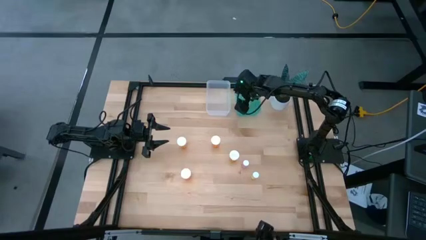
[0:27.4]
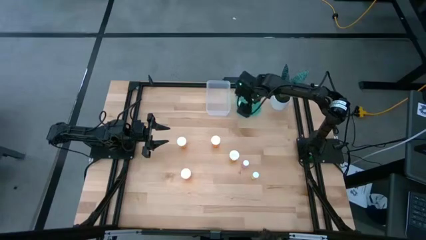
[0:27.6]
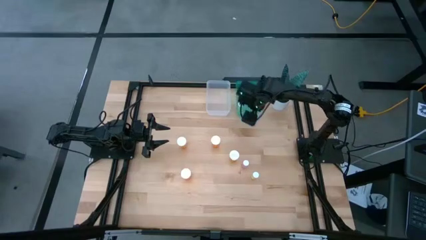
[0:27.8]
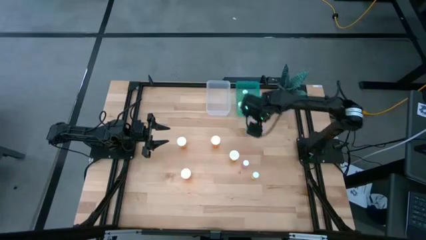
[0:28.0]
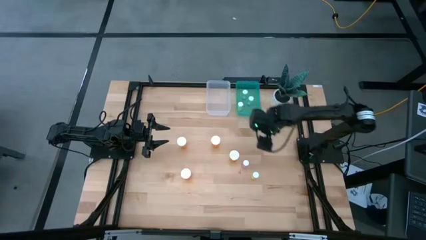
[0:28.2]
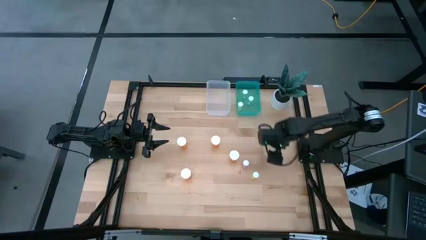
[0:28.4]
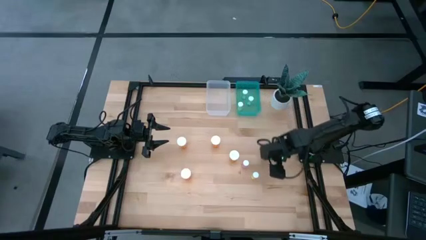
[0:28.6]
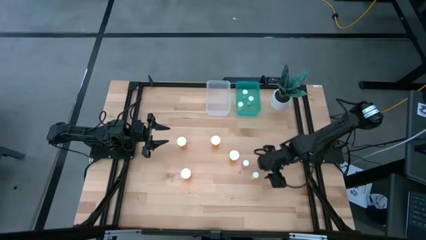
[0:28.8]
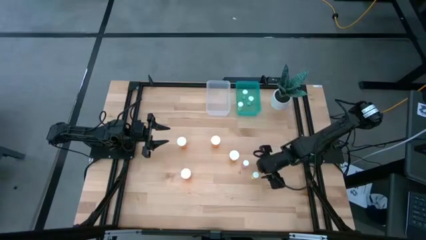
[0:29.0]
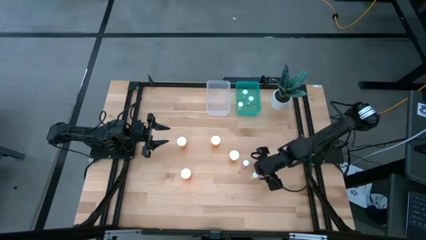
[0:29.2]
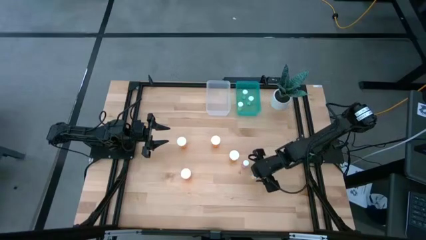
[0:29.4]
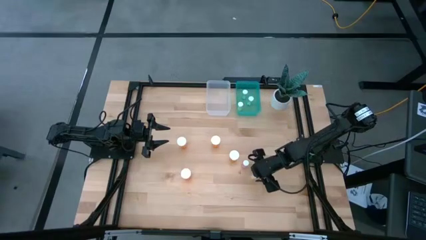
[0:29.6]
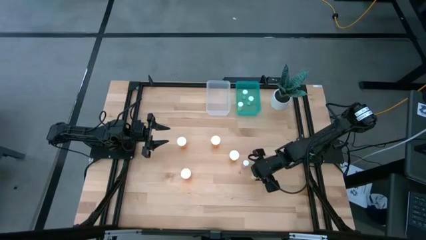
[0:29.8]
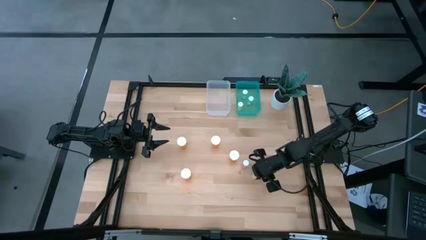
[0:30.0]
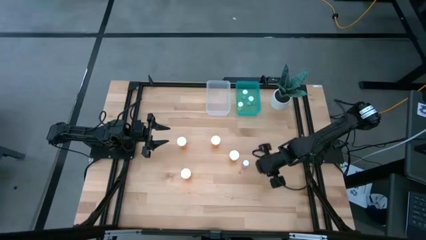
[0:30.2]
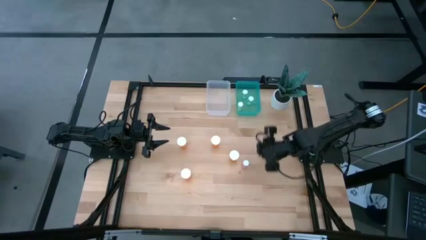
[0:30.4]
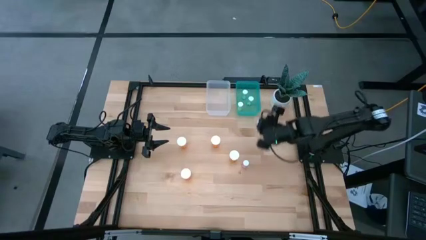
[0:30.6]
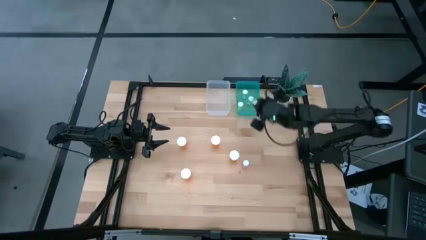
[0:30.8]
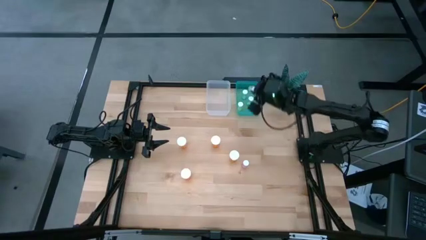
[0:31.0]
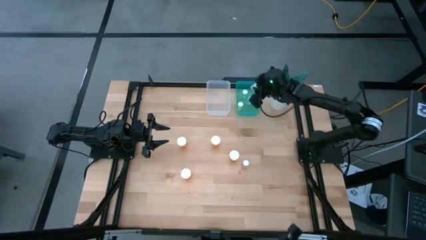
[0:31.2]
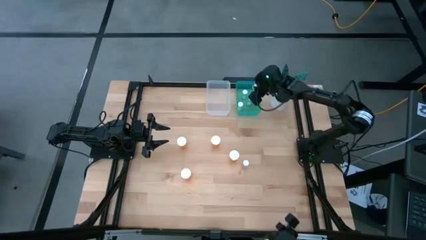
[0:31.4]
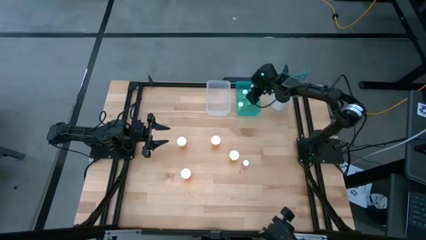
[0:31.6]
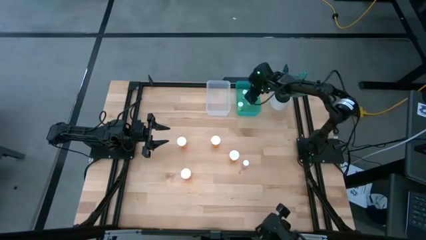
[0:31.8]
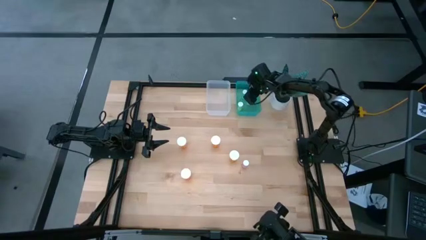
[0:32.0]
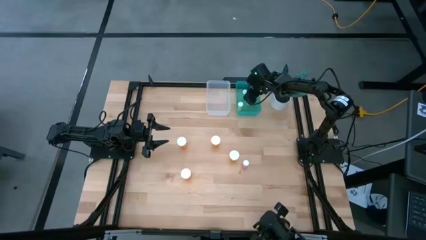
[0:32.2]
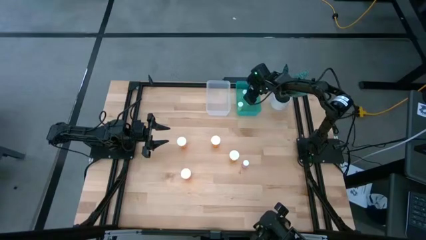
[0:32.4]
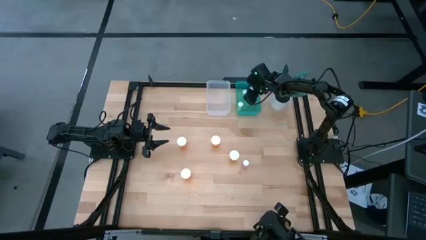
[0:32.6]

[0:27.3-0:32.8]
Task: Pick and place medicine bottles into bin by pill shape (circle, oval)
Put the small yellow pill bottle into the blue bin

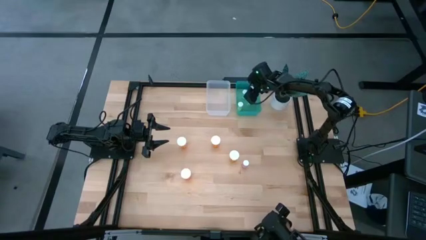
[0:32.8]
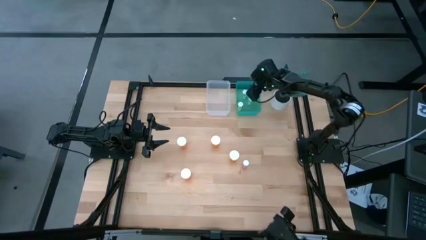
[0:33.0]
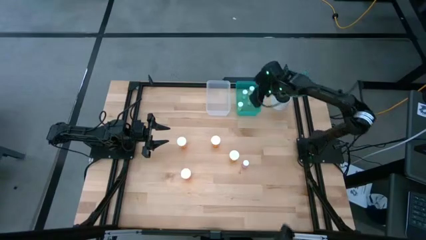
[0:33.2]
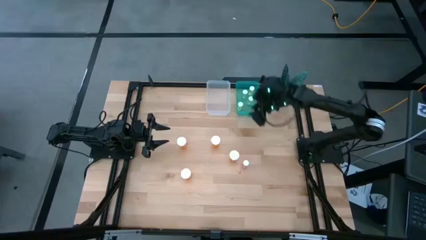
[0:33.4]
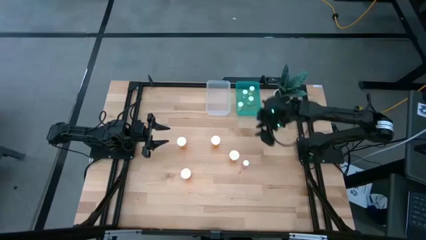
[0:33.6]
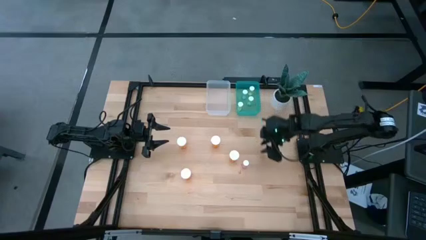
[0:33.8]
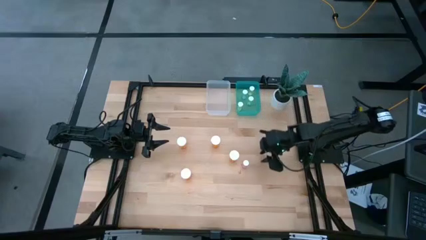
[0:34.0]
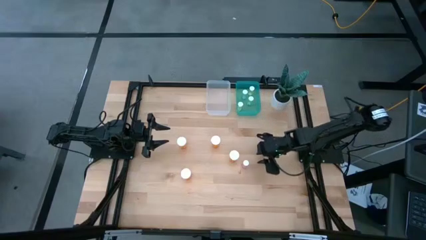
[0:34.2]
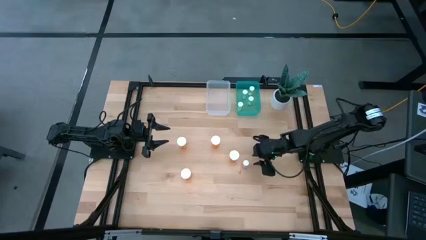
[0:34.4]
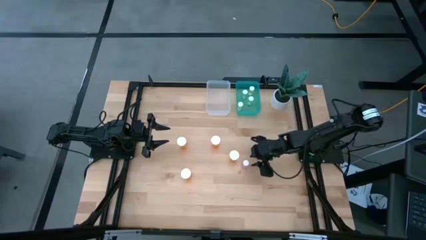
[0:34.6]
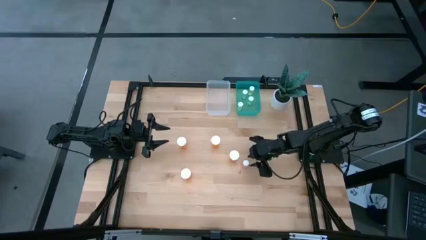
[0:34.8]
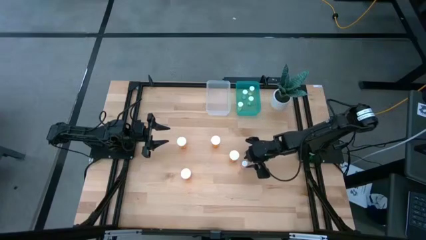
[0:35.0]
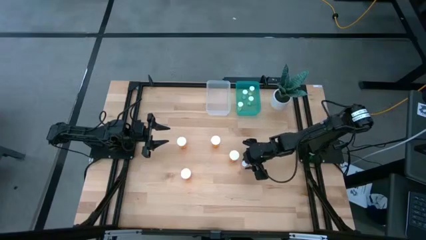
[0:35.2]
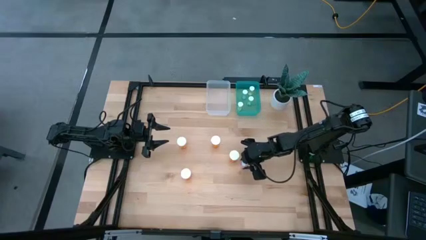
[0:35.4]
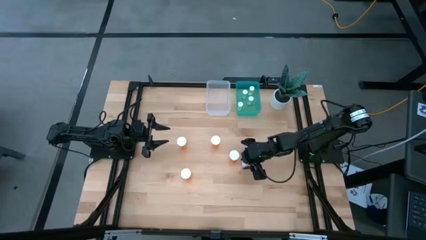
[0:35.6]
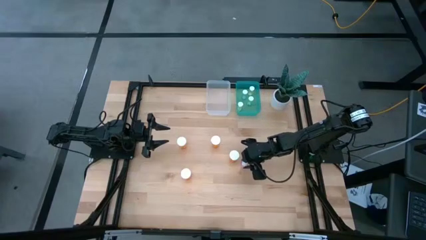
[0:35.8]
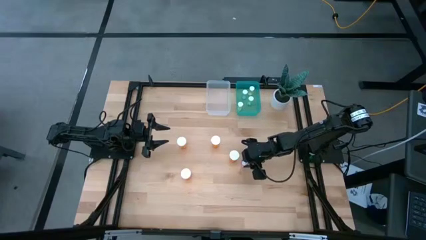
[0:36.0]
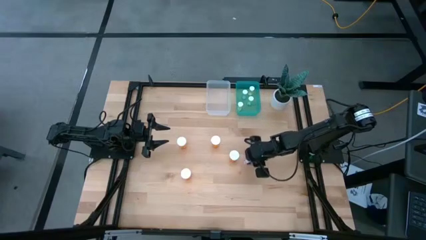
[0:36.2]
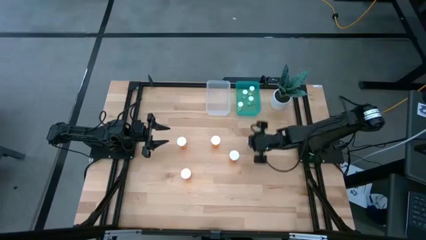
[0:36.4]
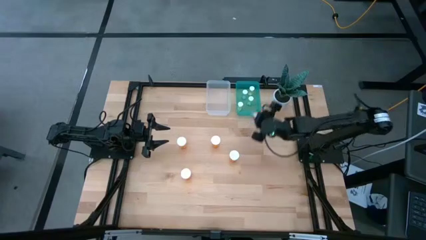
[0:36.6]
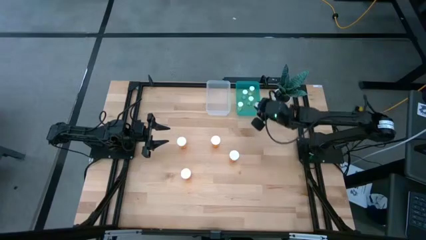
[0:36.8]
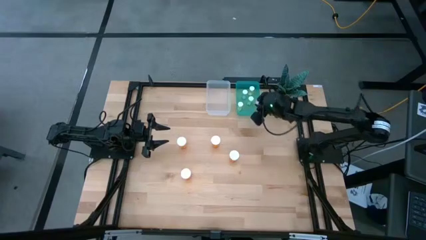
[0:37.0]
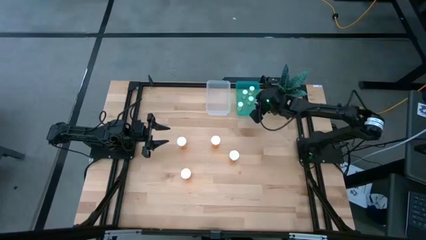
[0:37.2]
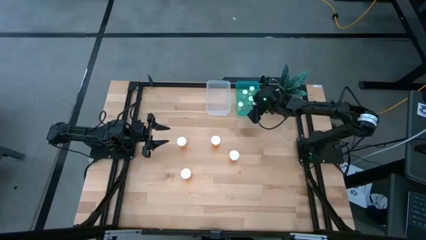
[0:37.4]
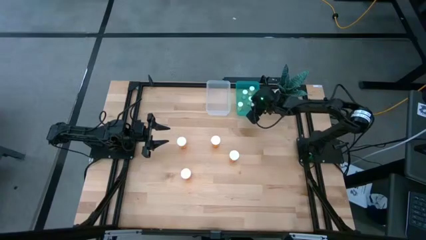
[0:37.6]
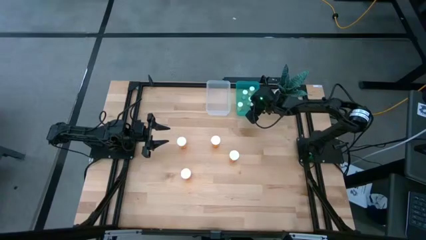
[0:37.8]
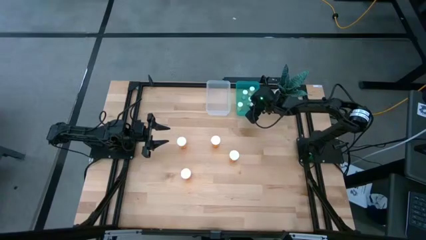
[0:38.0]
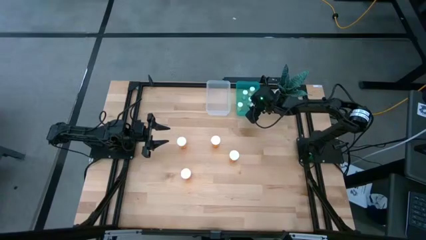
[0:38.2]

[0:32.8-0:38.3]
Put the small pink pill bottle into the blue bin

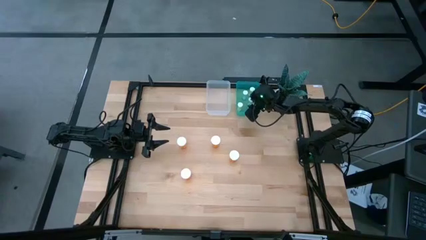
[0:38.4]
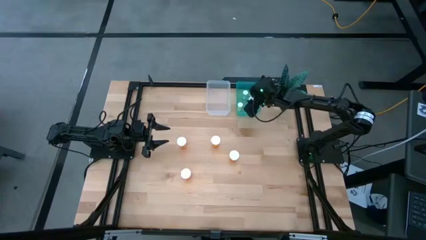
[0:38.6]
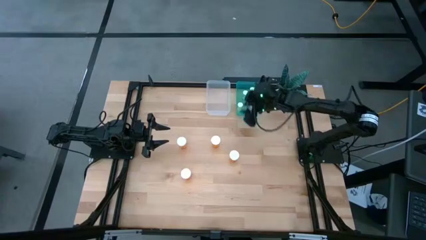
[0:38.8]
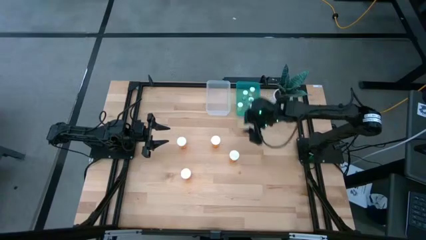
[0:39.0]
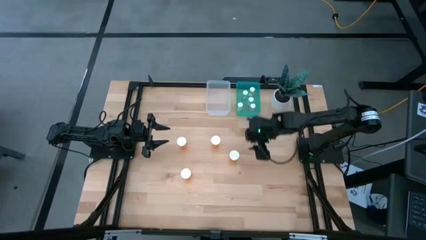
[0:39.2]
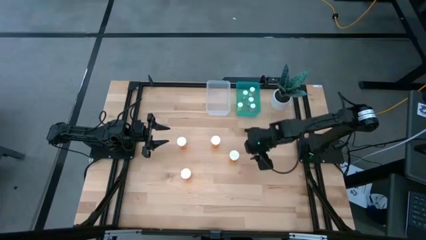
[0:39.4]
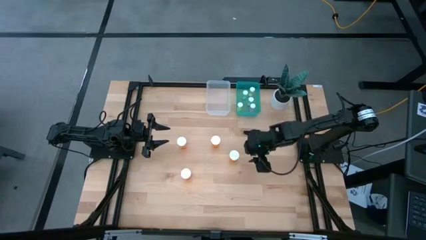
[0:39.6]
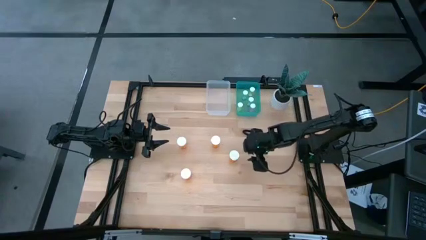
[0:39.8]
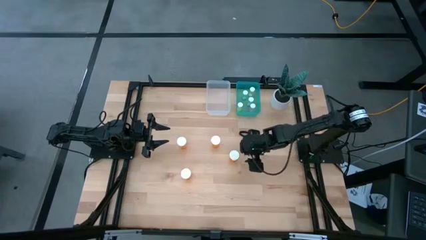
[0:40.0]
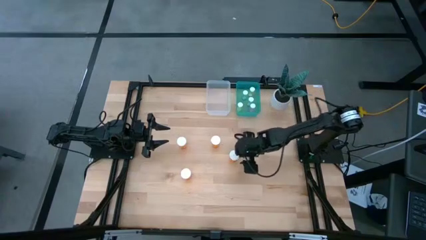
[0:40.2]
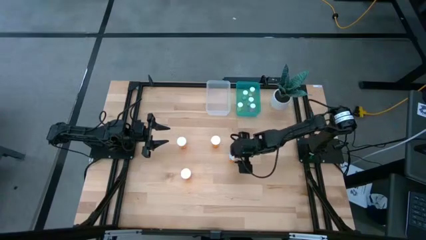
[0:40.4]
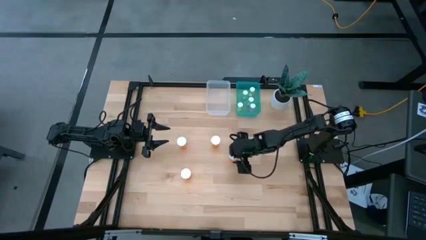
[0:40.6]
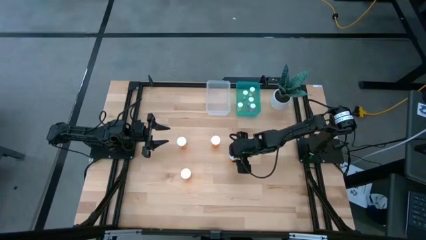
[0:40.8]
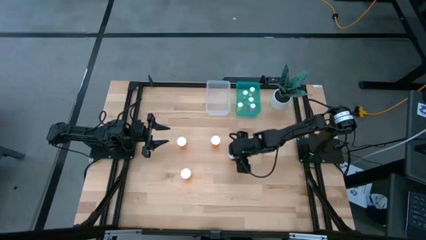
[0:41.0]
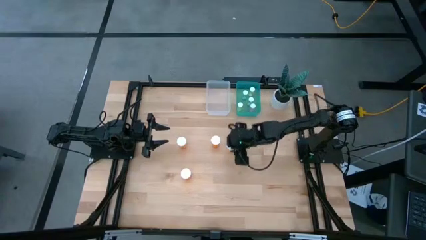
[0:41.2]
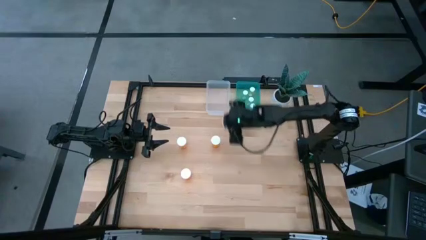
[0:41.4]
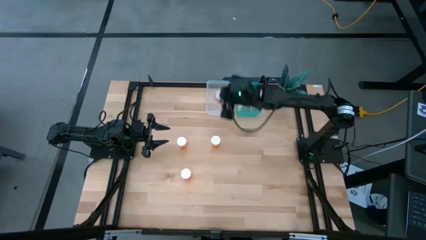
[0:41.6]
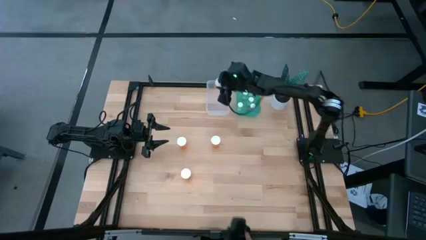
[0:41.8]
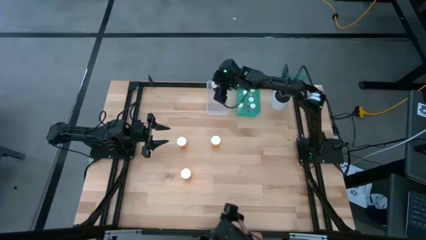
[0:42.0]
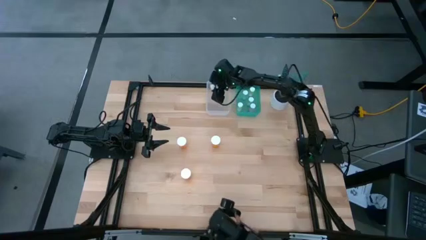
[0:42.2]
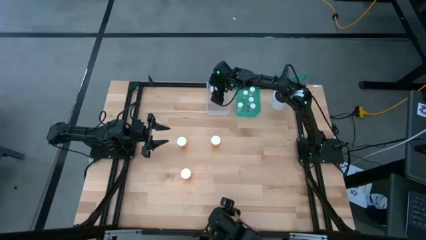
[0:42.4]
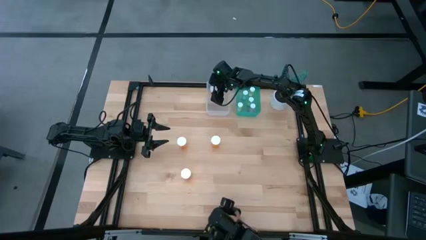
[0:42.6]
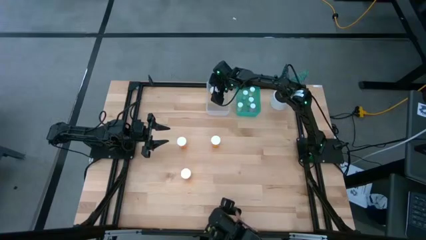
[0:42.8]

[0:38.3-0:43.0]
Put the large orange pill bottle into the transparent bin

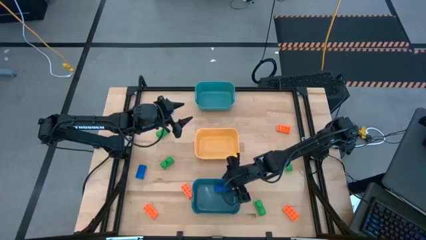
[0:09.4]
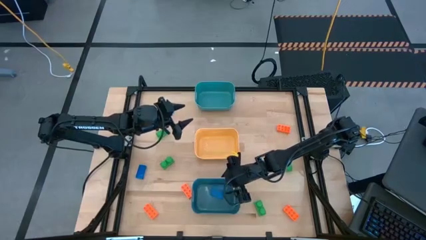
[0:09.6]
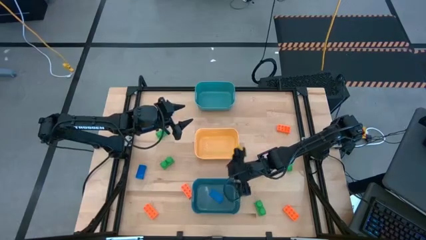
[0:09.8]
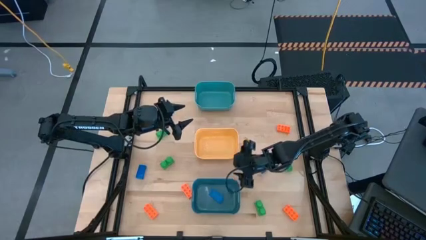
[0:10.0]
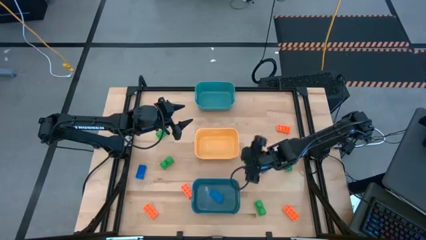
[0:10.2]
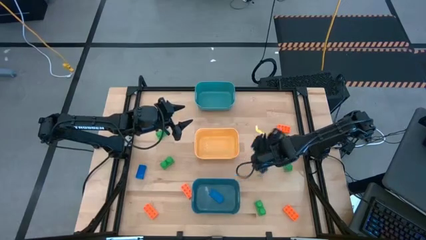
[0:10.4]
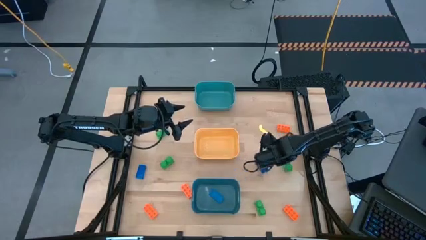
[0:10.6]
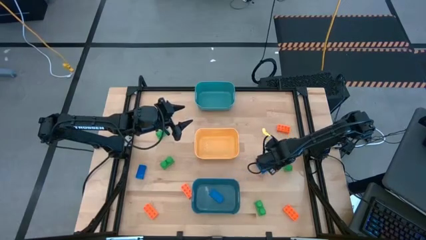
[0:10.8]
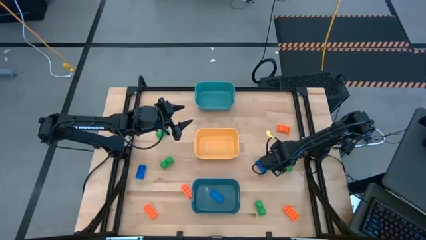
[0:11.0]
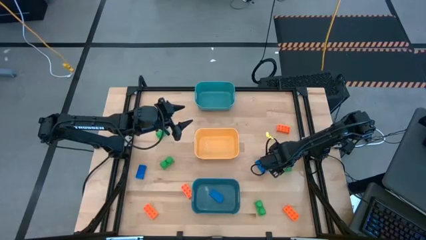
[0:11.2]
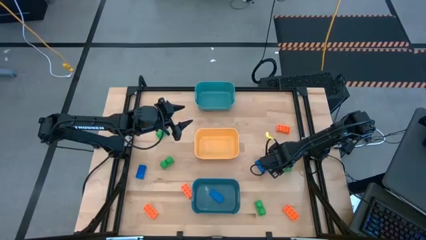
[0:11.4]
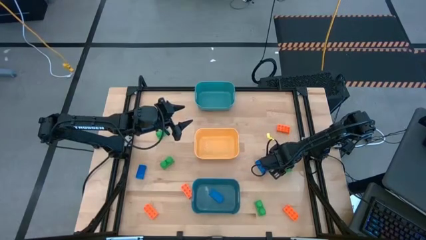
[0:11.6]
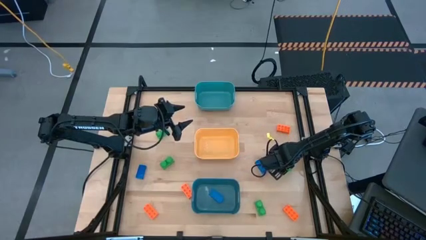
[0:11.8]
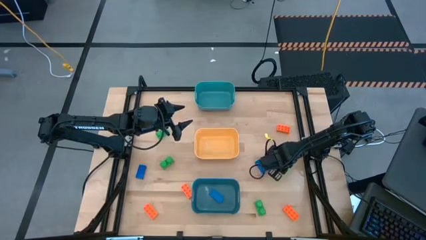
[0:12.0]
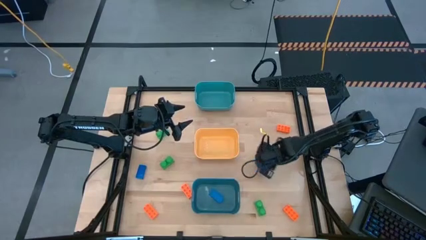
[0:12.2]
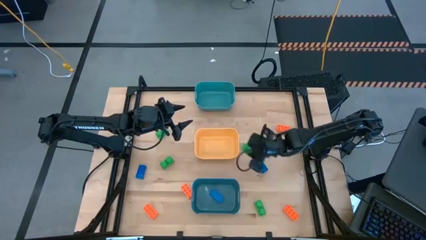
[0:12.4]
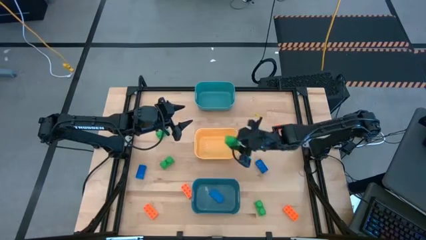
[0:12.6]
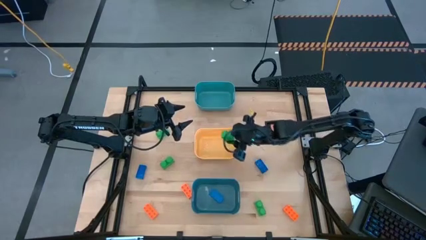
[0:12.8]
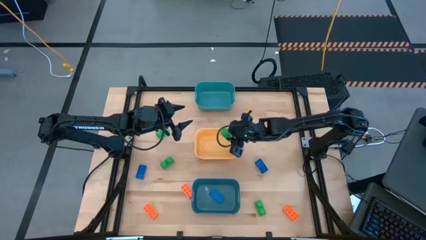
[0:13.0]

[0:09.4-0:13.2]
Task: Sort & place blocks by color
Put the green game piece into the yellow bin
